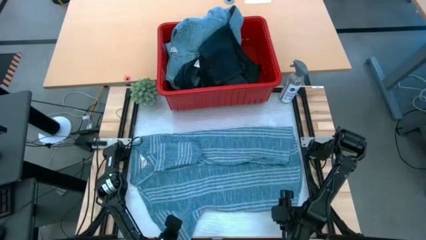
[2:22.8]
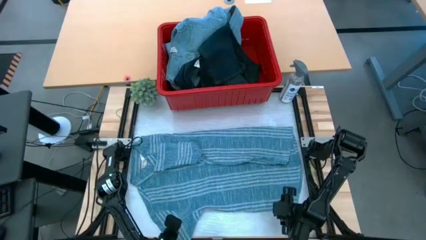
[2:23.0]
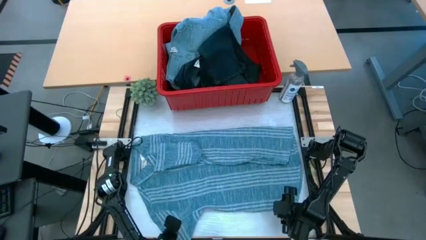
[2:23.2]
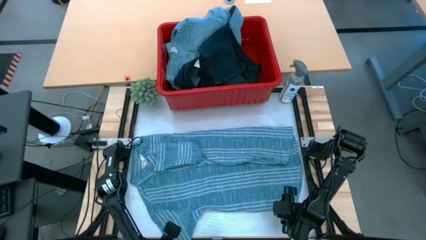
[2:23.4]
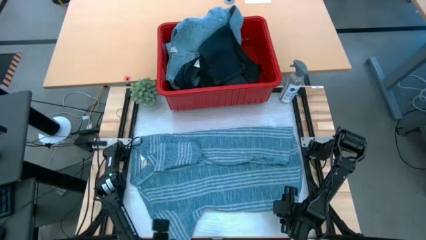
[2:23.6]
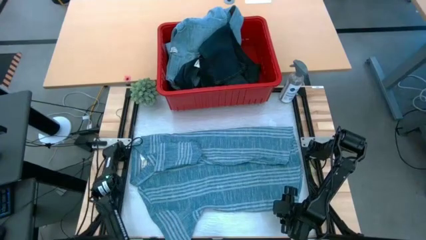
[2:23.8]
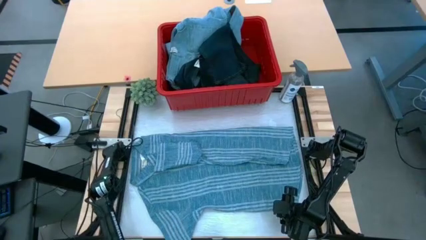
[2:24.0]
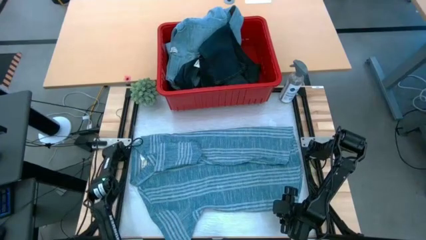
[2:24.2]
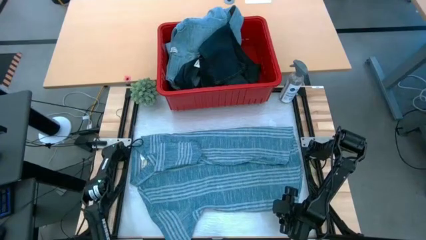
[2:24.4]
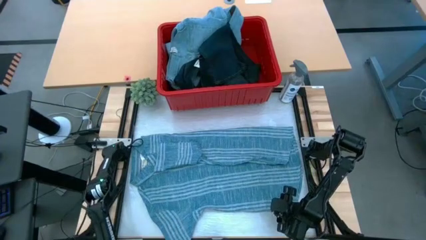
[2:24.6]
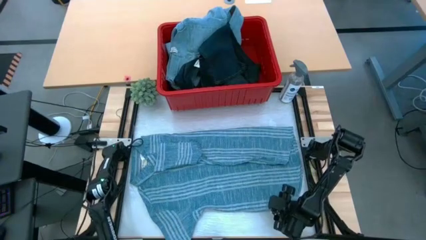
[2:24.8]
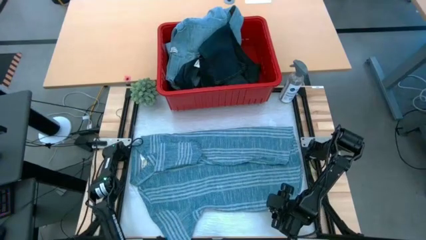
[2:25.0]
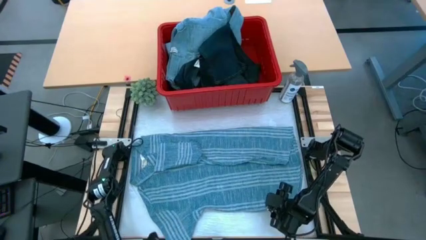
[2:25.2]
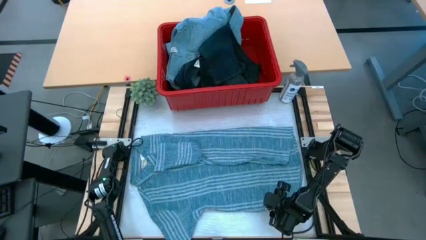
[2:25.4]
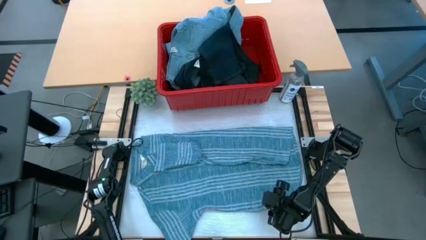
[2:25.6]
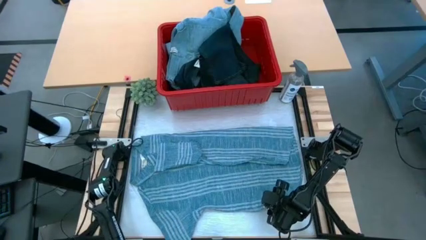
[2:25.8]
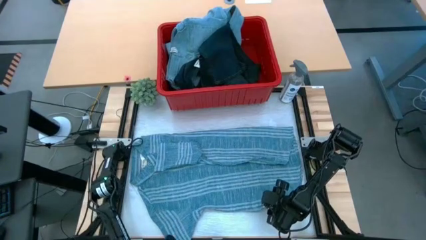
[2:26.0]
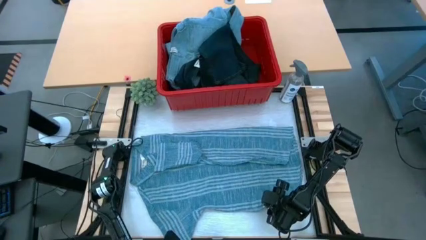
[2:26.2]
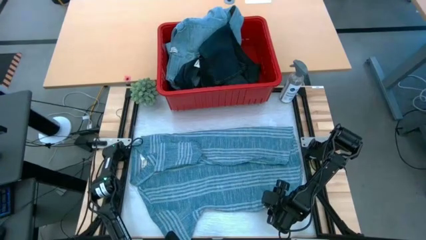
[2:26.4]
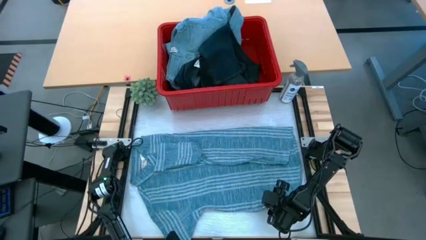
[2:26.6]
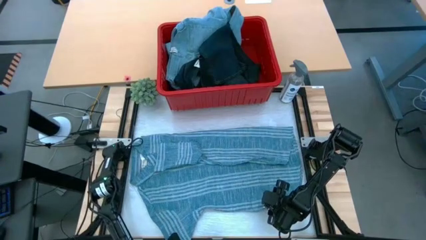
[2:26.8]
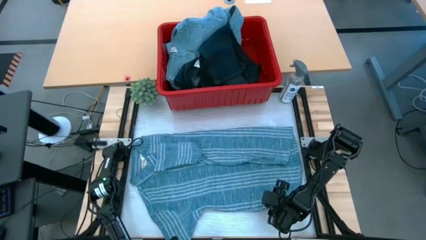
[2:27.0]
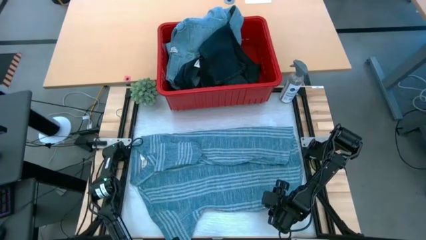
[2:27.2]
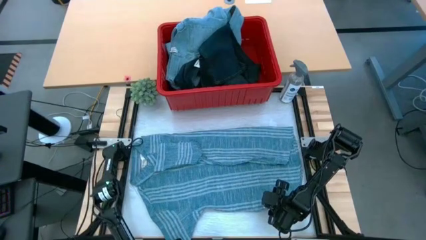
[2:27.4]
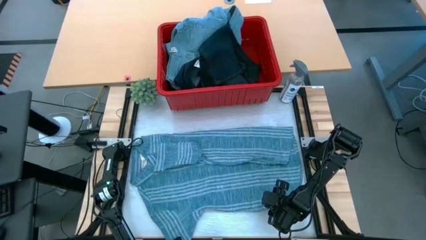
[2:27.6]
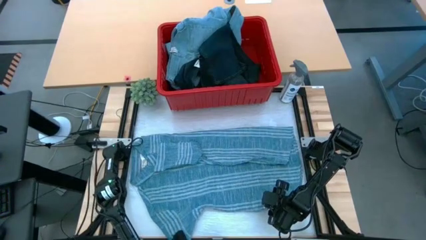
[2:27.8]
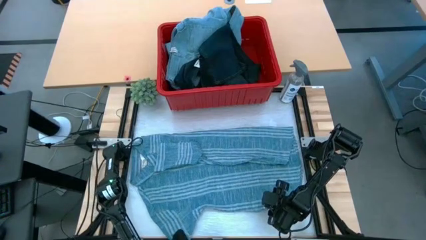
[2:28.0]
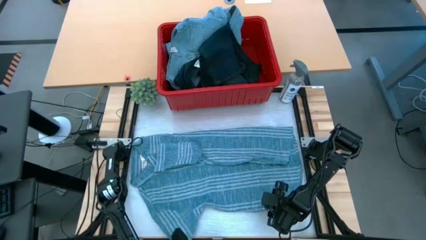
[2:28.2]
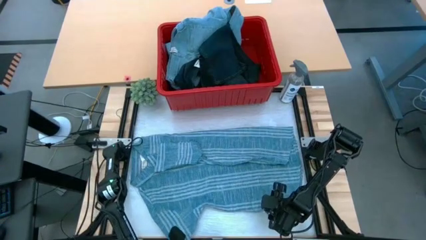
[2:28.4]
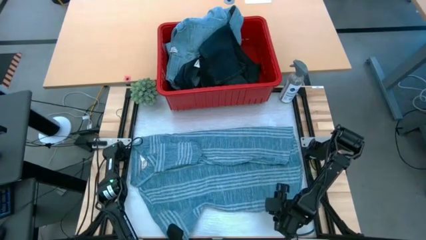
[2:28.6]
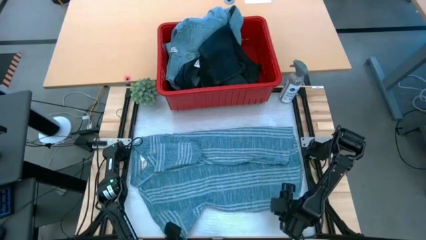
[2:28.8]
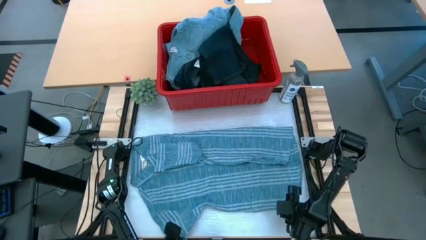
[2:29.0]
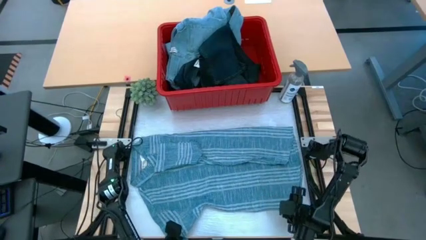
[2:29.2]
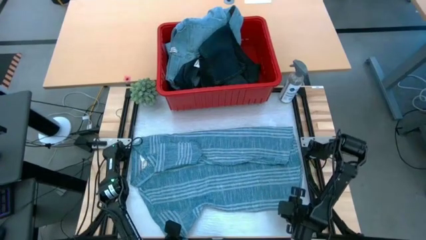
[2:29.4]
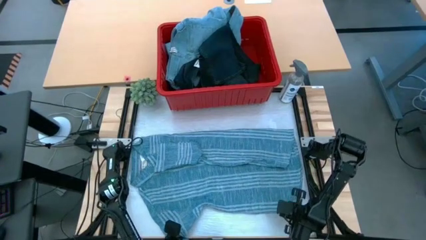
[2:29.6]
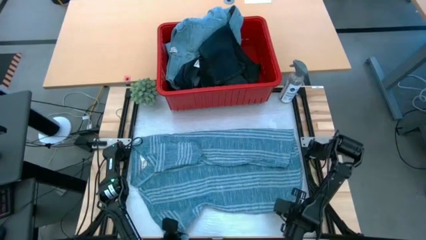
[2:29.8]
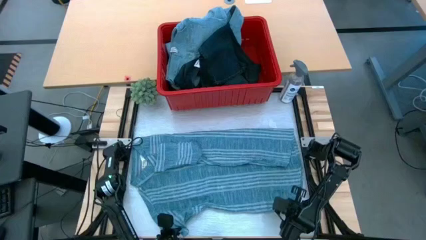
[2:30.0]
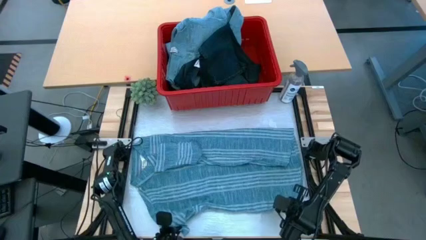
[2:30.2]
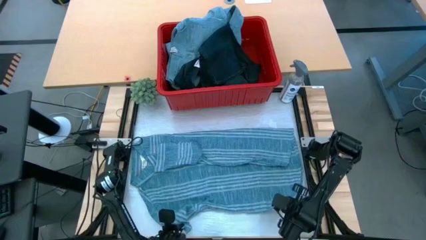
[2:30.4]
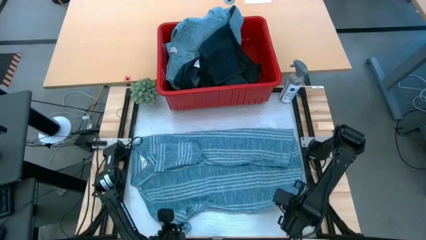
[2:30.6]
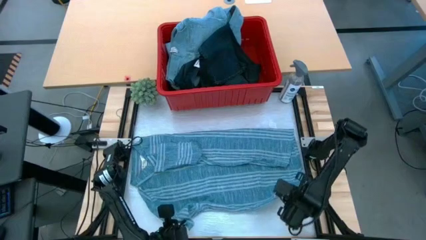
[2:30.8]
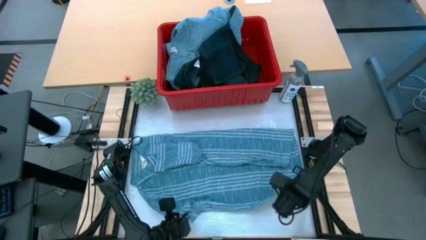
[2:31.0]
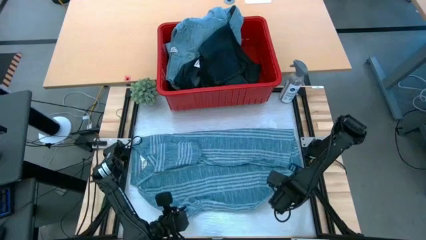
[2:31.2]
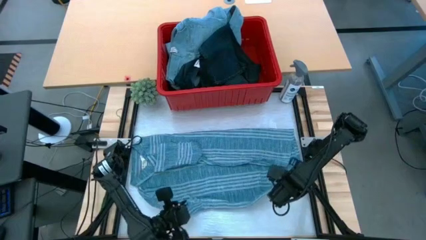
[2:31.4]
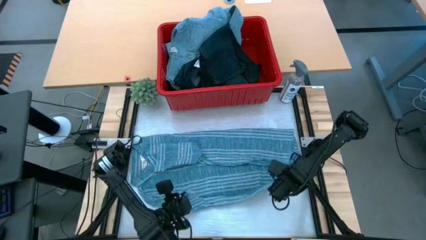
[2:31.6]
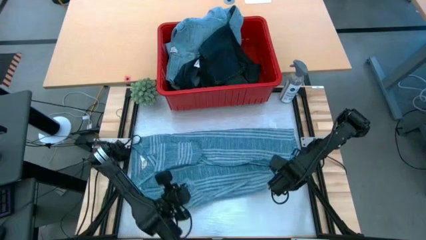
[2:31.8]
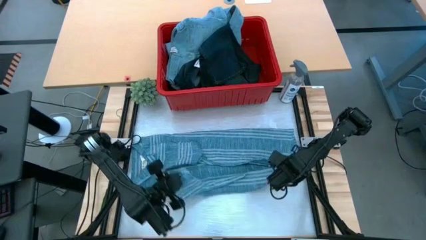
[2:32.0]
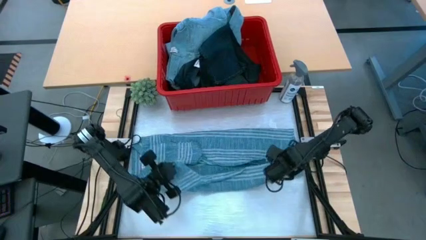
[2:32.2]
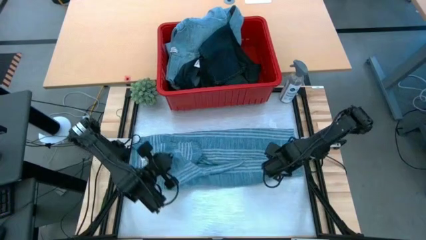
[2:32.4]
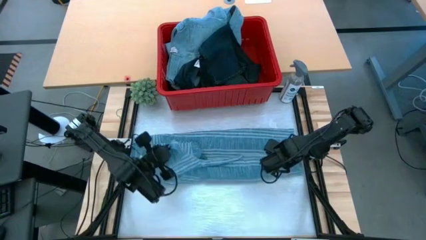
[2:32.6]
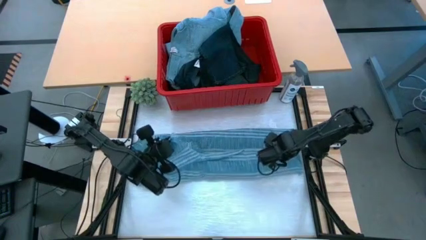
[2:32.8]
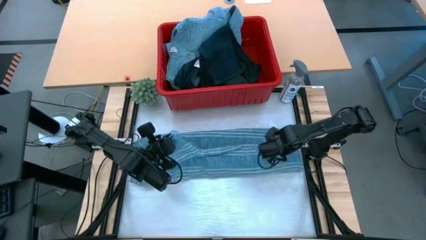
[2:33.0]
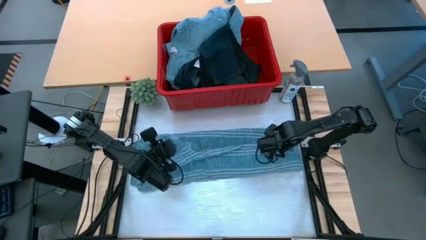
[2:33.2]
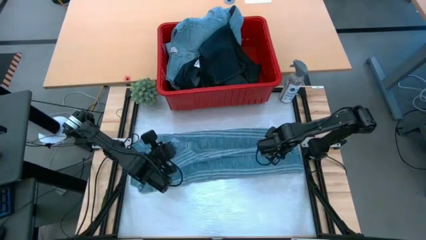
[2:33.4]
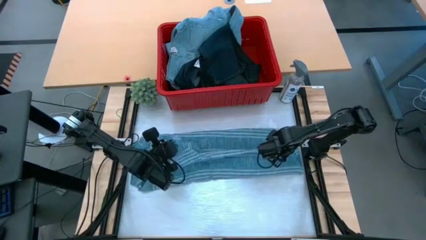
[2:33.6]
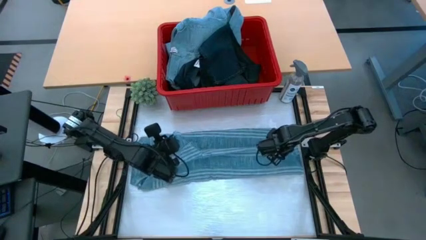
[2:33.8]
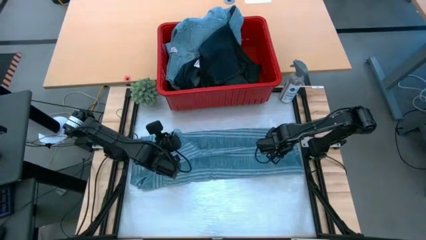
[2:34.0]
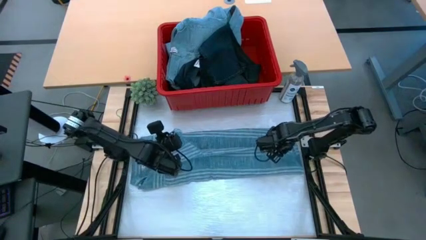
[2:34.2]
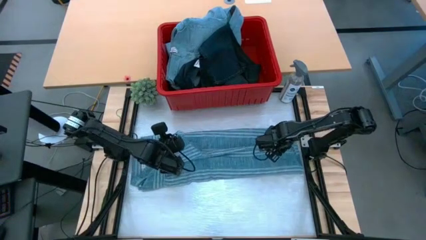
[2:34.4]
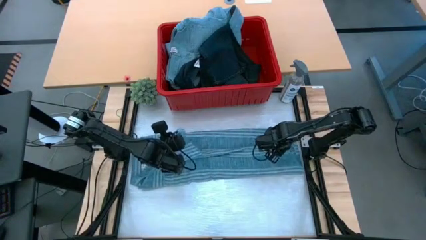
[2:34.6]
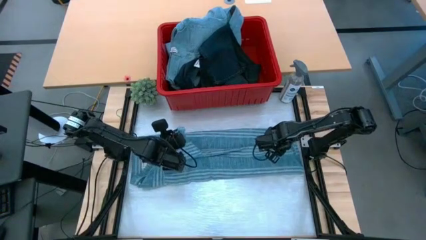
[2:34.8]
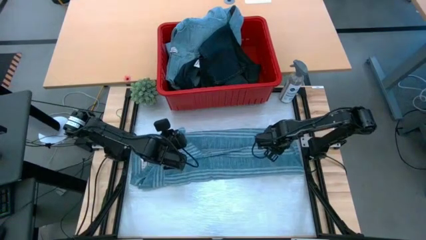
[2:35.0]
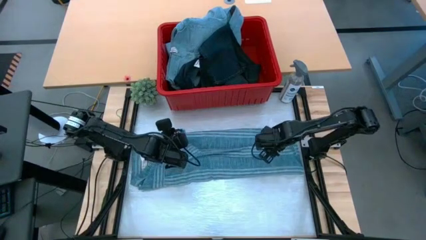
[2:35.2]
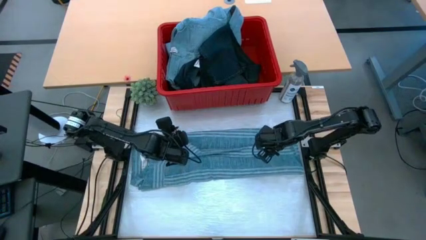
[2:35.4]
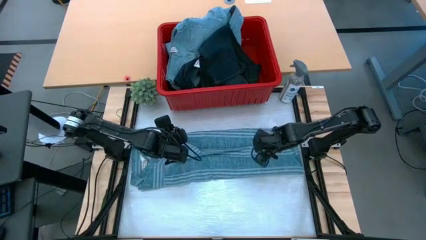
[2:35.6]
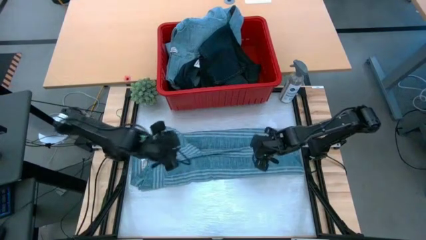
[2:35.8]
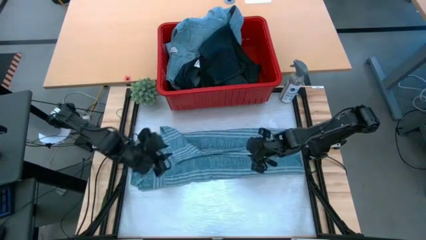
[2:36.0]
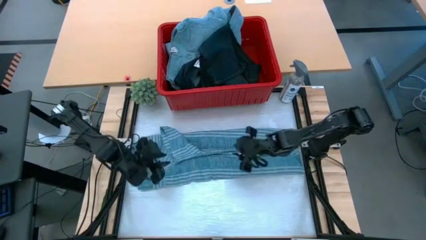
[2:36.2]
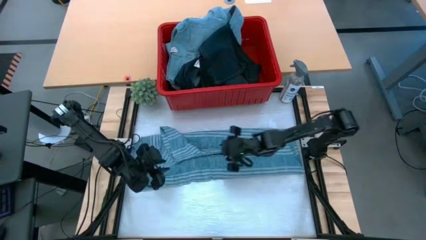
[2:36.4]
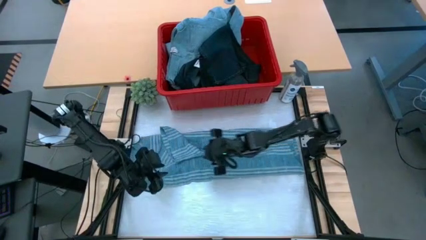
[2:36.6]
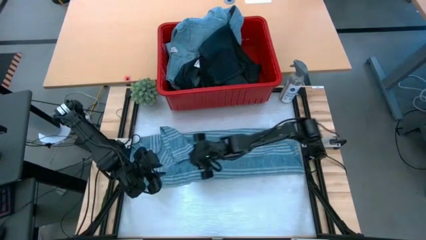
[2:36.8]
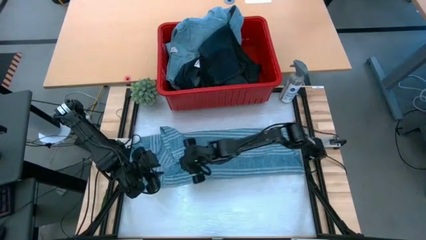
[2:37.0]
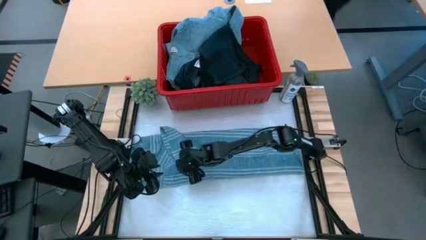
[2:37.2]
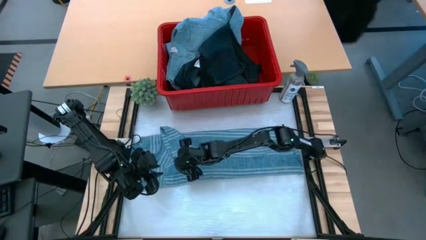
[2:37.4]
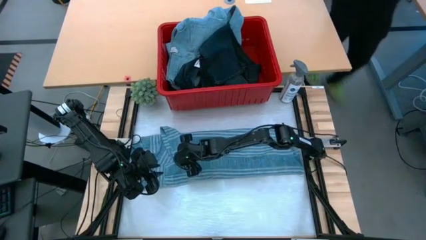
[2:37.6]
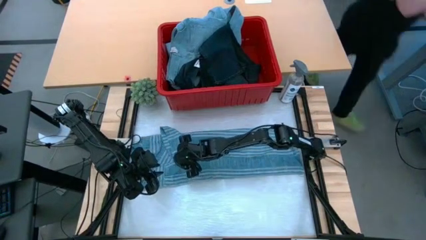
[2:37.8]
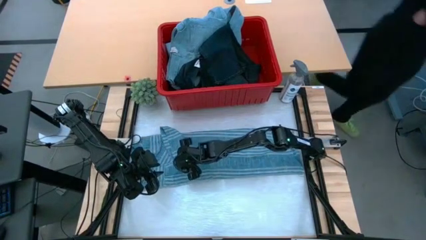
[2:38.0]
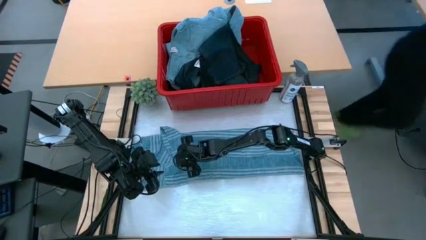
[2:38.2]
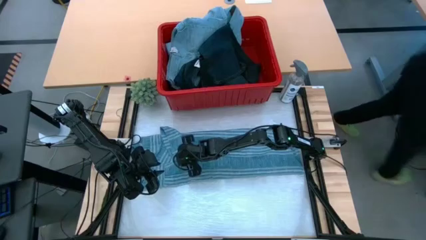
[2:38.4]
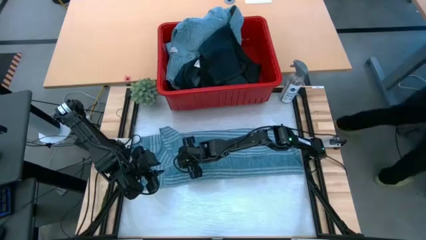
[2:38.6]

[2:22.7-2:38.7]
Task: Fold Laundry from Bin
Fold the blue polo shirt
